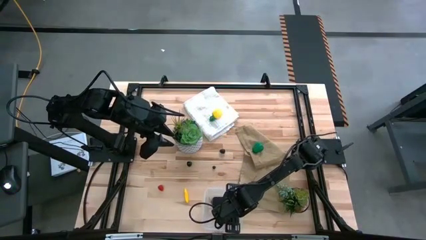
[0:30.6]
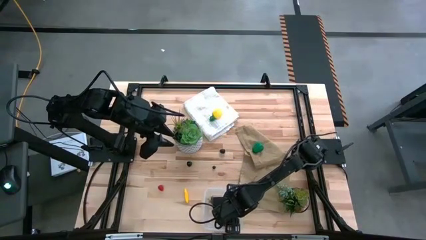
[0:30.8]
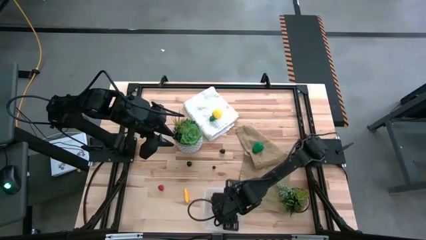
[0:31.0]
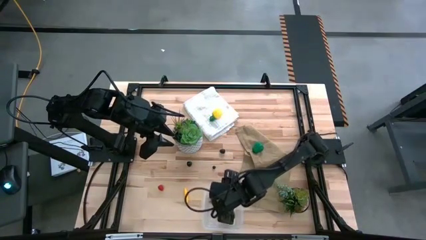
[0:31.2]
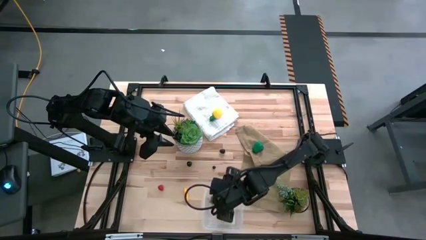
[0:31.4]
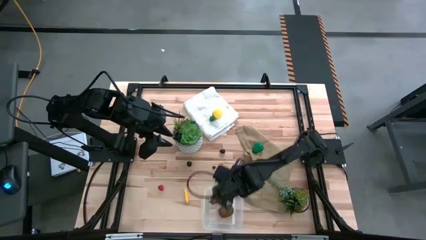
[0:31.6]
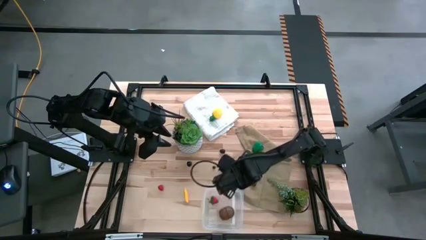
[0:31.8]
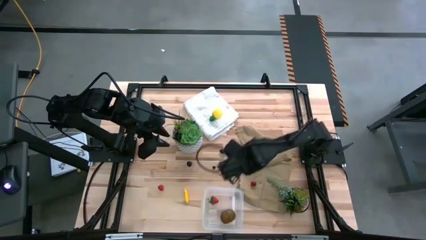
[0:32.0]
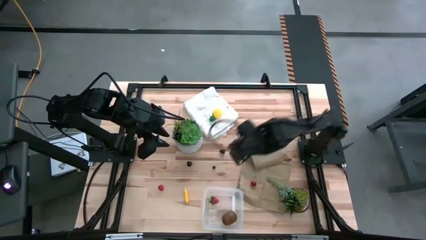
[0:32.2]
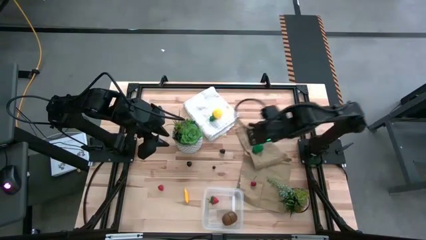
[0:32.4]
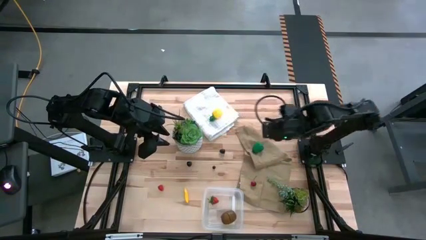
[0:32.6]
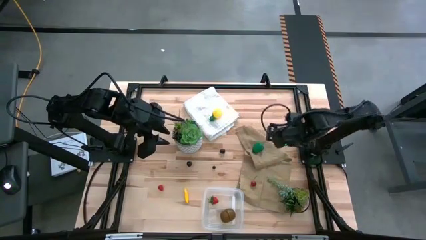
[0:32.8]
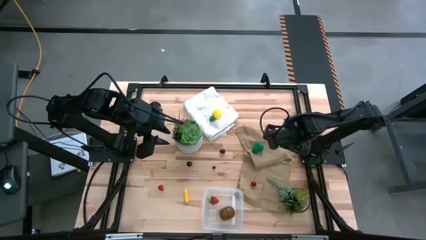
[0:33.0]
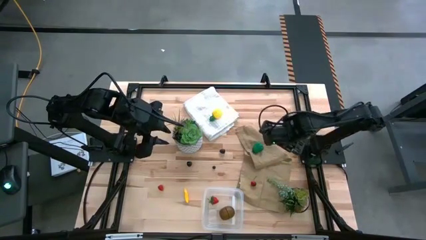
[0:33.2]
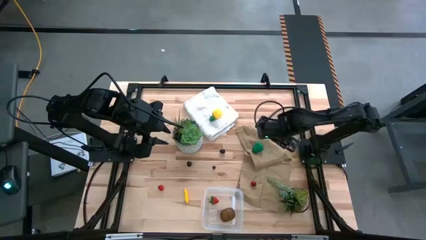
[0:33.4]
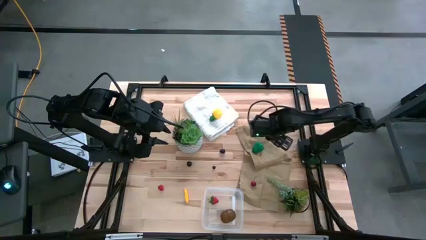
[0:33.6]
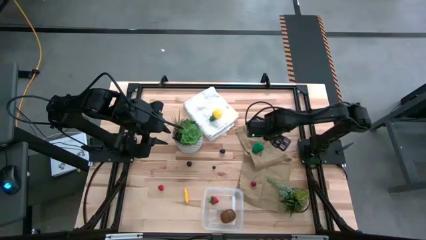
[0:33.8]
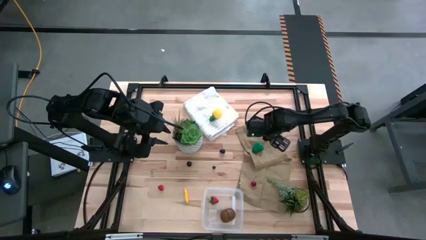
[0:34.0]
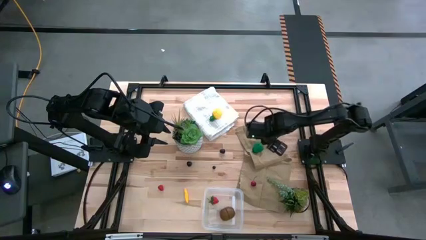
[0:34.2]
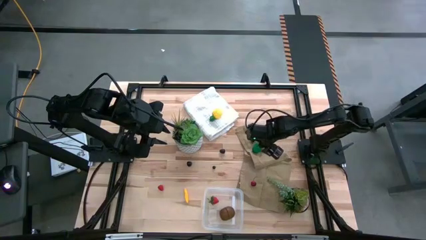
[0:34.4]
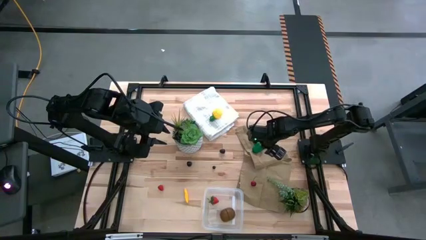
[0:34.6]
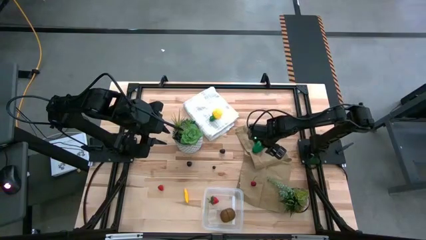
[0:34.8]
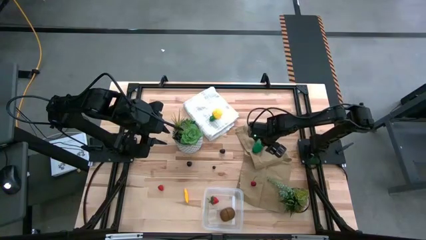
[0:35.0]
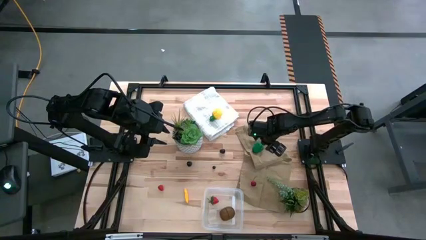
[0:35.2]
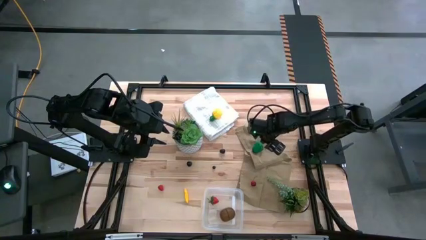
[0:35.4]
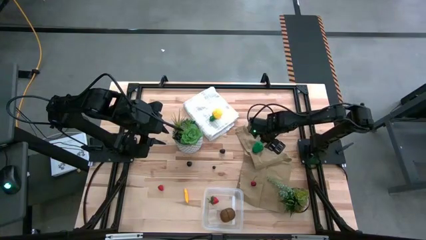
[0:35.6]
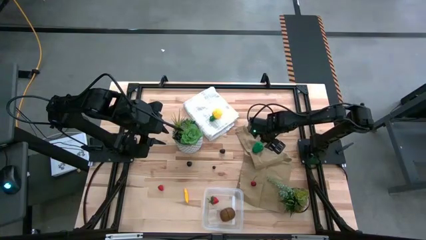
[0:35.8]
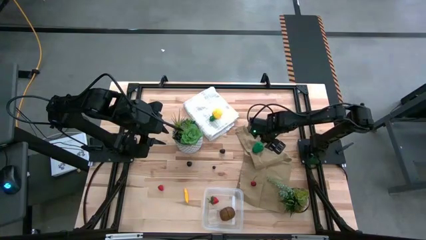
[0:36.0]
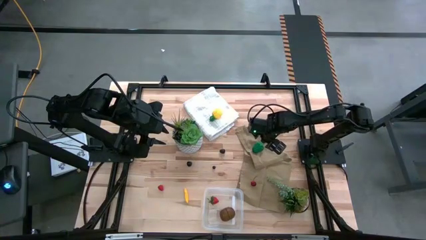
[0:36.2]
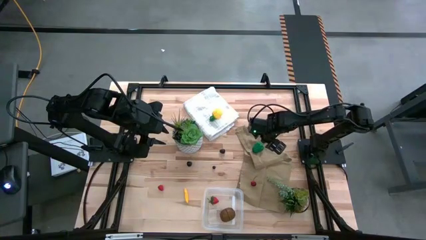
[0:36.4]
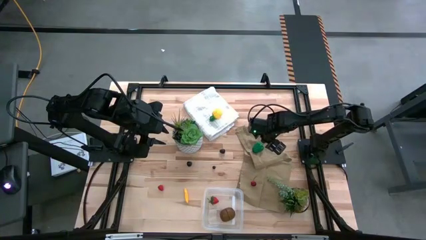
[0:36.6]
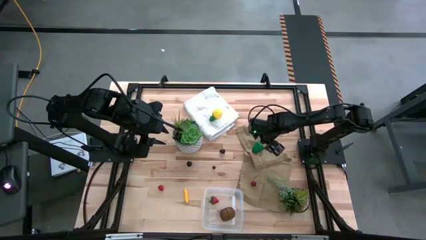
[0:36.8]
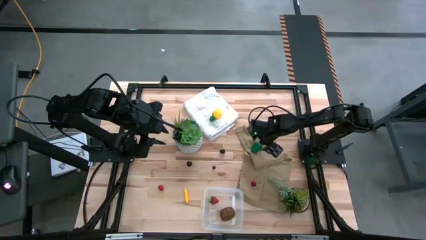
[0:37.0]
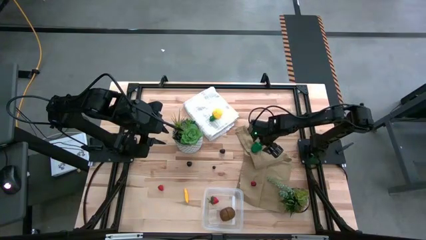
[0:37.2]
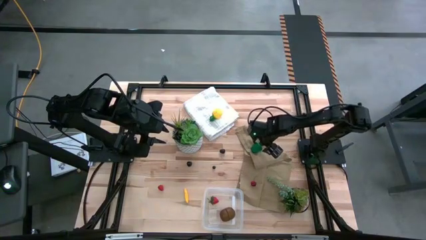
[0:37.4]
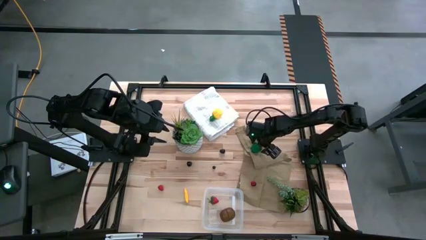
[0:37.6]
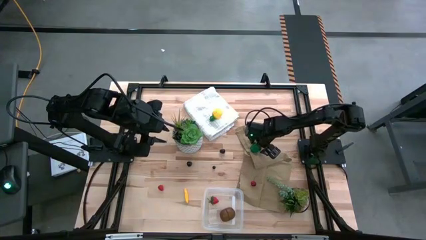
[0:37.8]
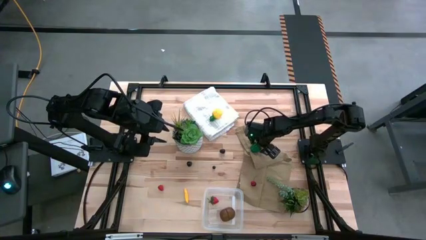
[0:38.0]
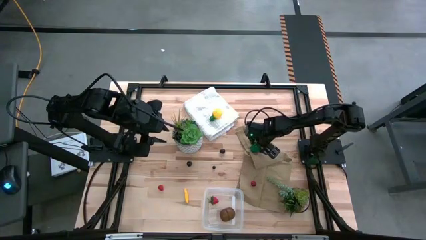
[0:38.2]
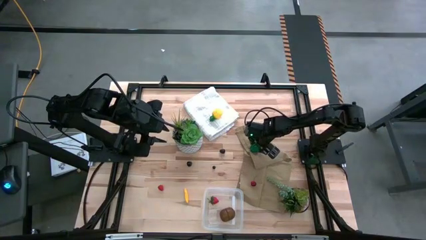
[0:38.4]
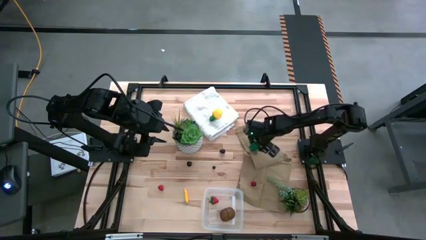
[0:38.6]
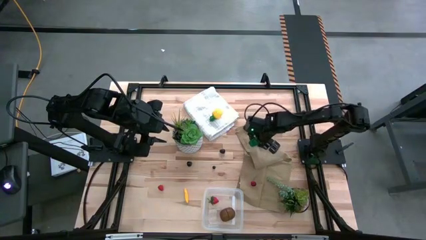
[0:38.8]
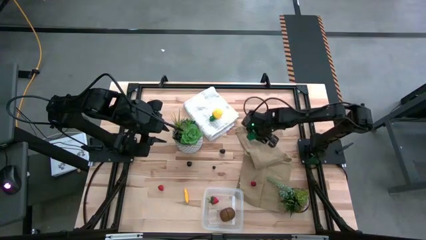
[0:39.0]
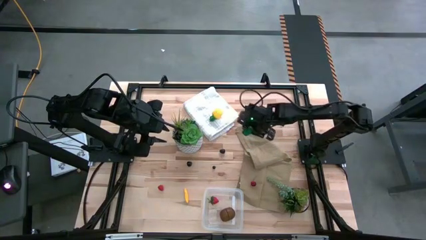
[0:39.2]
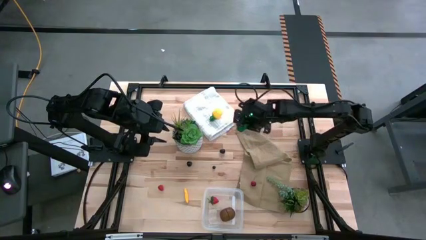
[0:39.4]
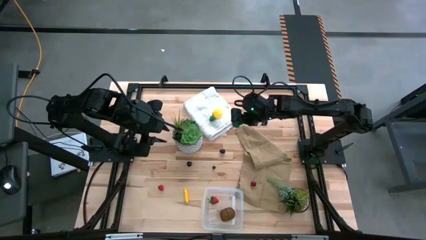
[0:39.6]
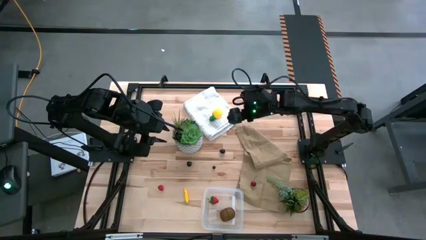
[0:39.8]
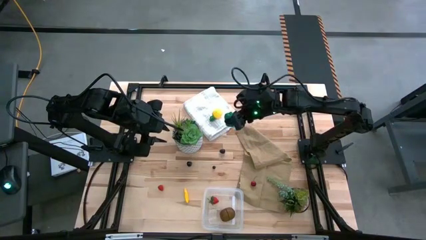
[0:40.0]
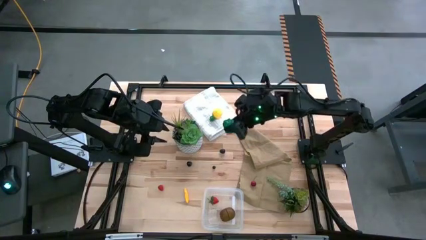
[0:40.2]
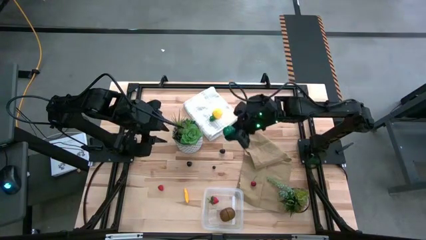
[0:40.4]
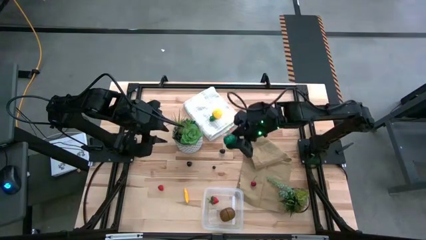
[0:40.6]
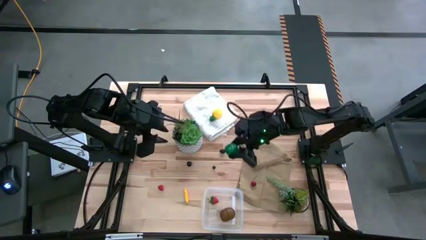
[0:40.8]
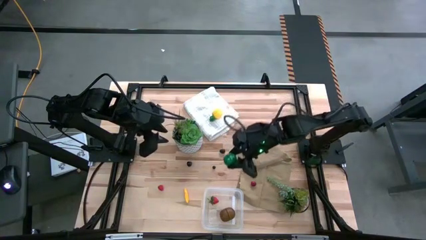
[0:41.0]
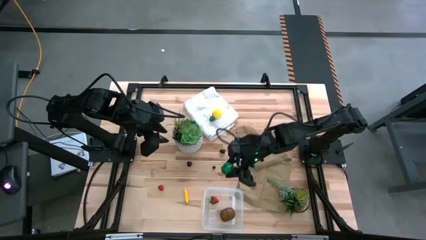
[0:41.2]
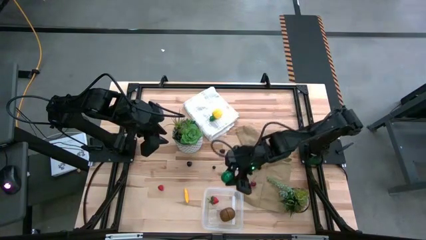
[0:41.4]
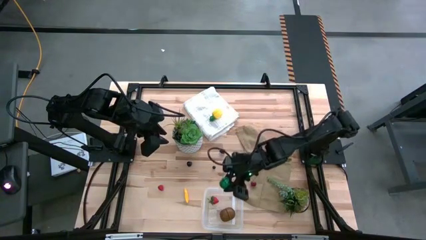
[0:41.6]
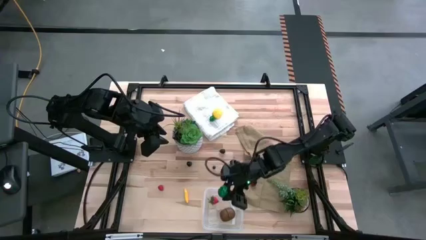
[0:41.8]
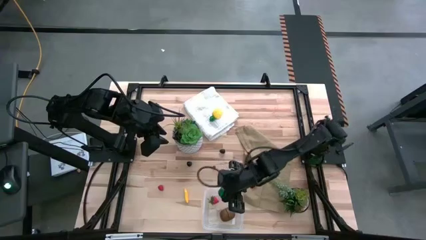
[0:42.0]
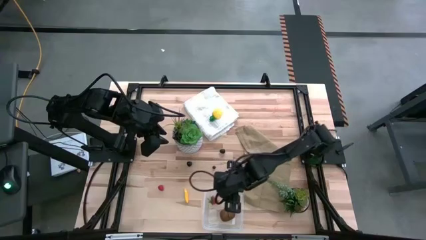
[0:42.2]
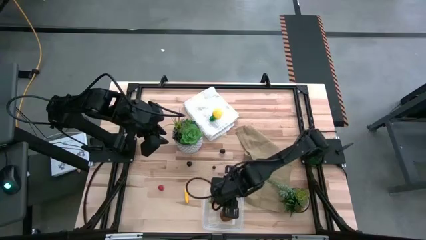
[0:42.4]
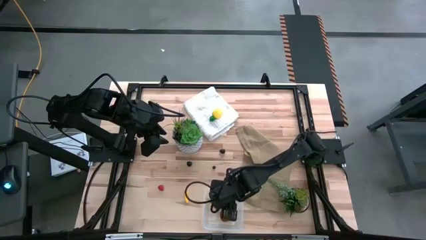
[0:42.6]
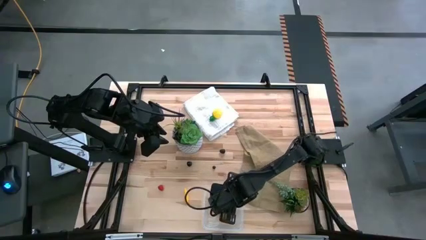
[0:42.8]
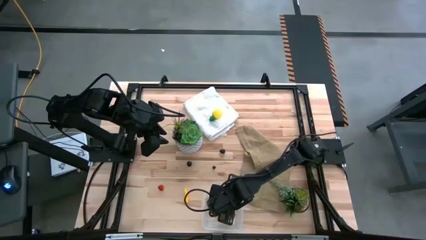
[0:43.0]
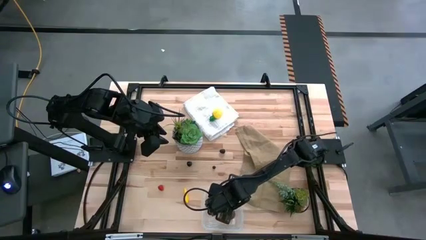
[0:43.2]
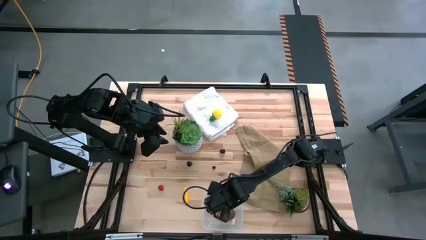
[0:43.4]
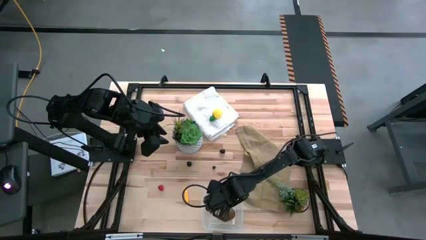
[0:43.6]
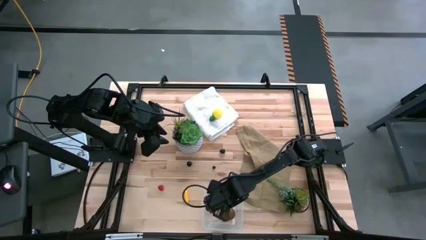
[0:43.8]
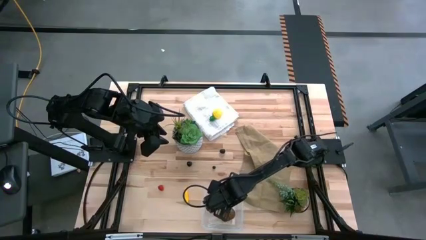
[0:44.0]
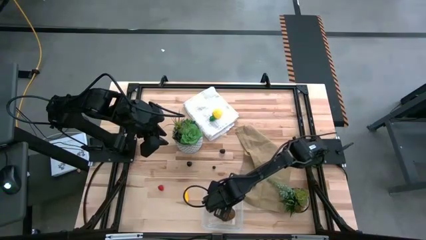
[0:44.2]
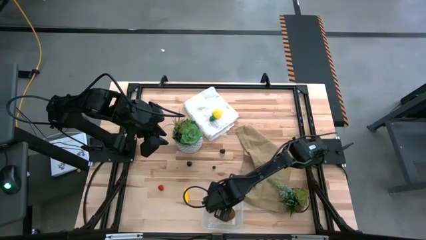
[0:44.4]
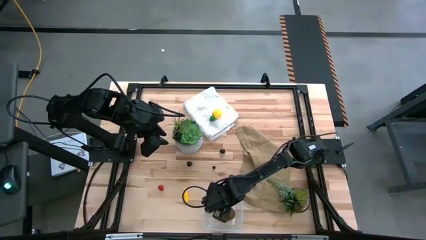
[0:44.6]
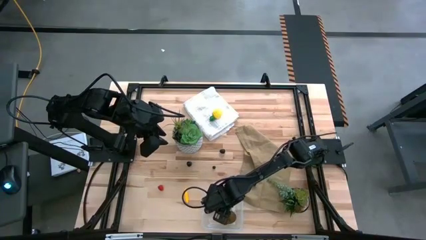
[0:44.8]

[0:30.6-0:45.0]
Task: Pick and placing Produce into tupperware
Put the green bell pepper into the transparent bin

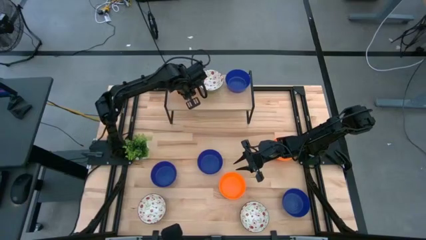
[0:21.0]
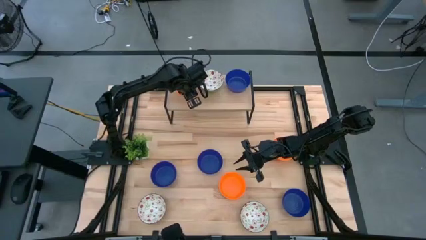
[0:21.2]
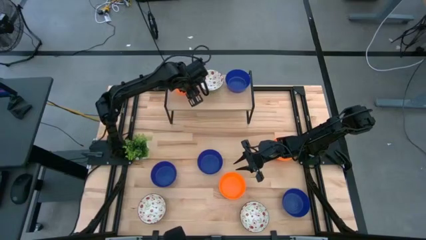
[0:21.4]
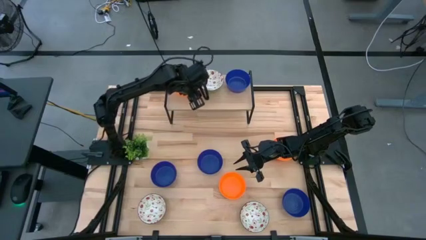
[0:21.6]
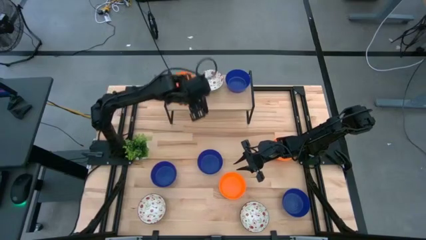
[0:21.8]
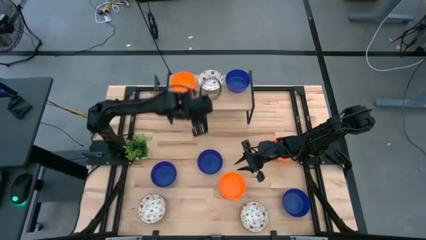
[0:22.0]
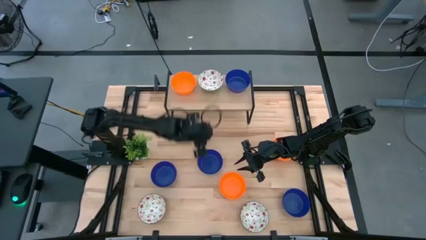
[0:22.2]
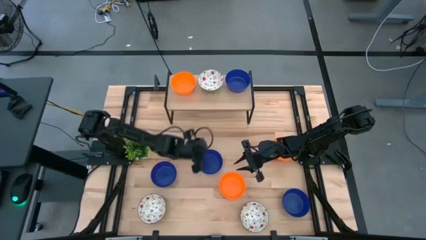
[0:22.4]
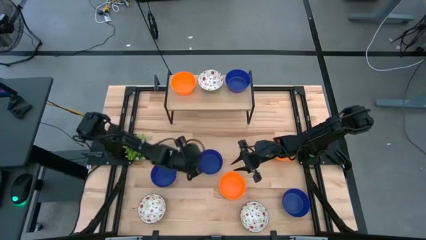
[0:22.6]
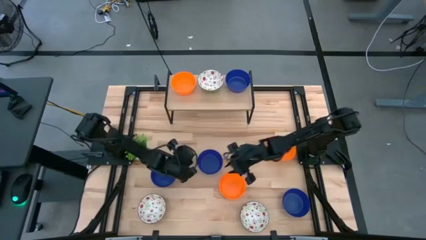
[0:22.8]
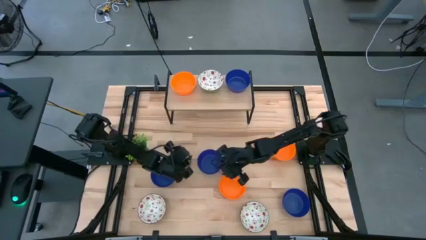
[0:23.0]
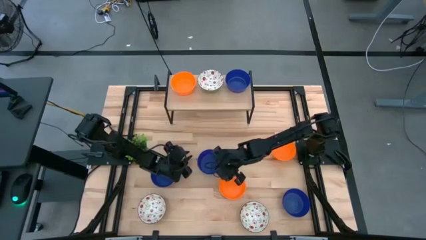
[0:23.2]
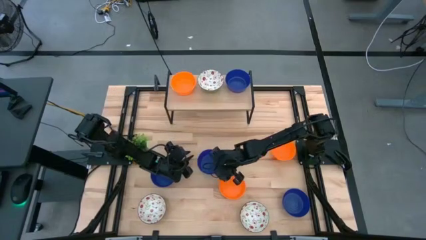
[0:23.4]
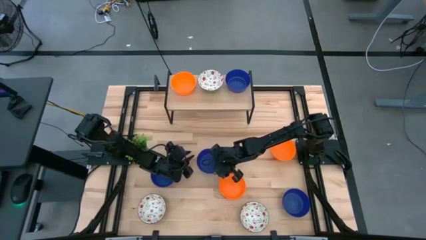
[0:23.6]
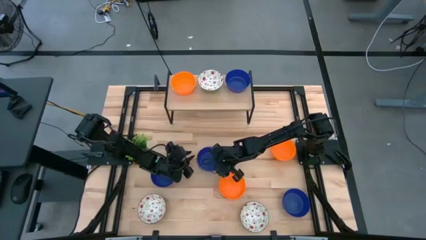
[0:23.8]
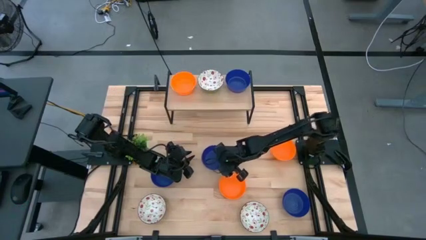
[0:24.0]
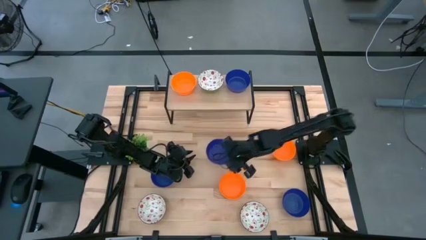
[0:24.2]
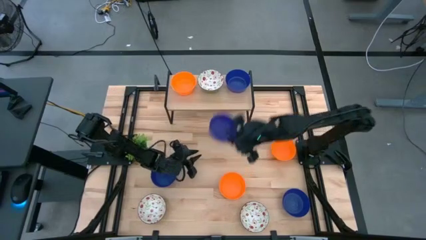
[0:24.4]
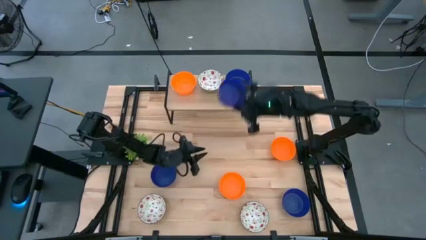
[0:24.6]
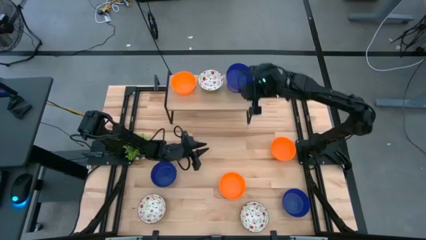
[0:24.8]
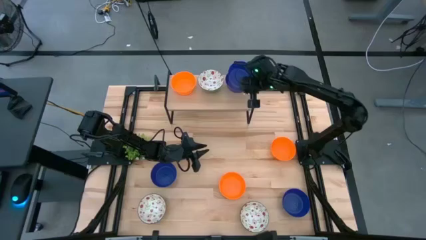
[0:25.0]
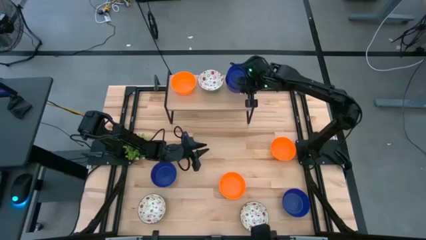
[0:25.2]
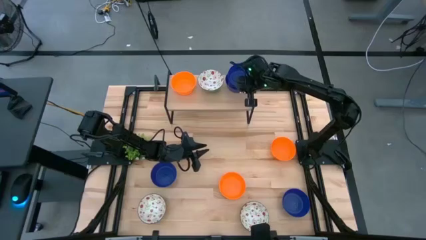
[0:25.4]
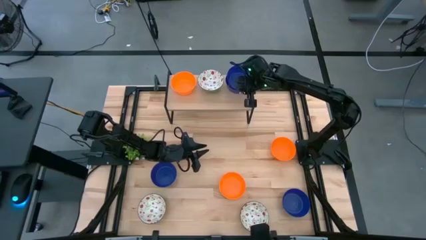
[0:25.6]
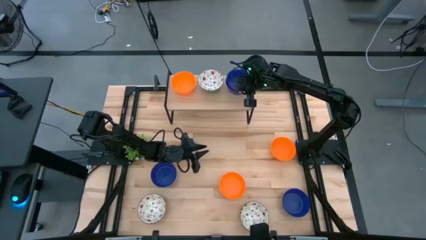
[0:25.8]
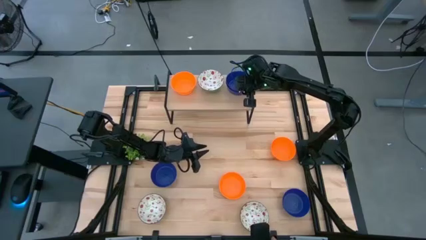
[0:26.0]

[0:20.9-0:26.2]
Task: Pick & Place Mini bowls
Stack the blue bowl on top of the other blue bowl on the shelf
